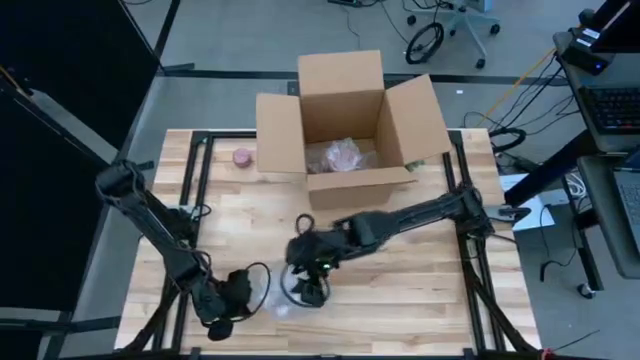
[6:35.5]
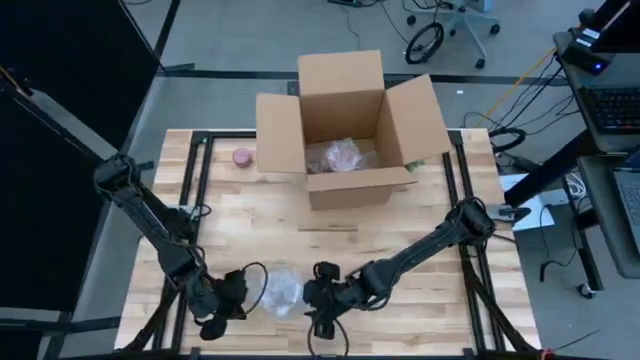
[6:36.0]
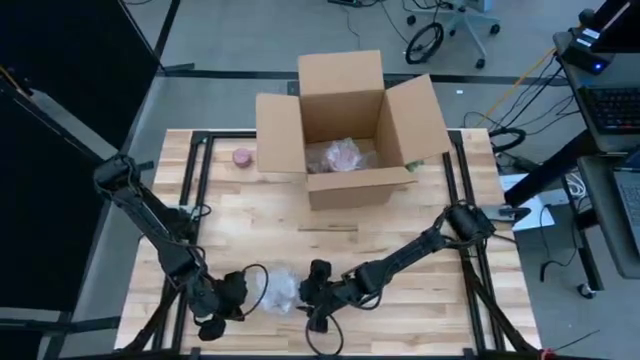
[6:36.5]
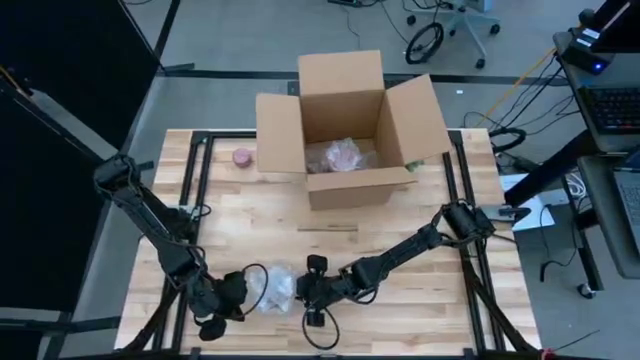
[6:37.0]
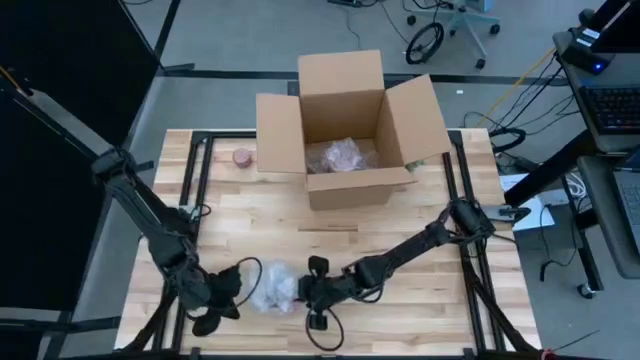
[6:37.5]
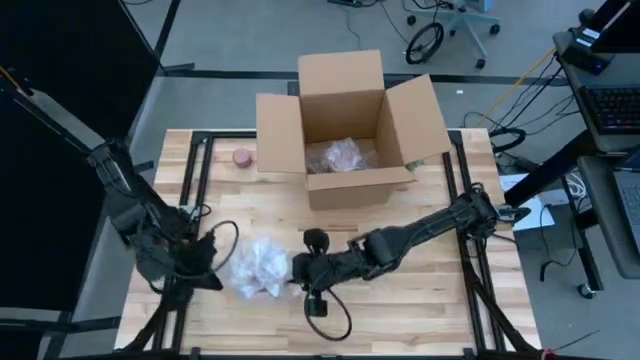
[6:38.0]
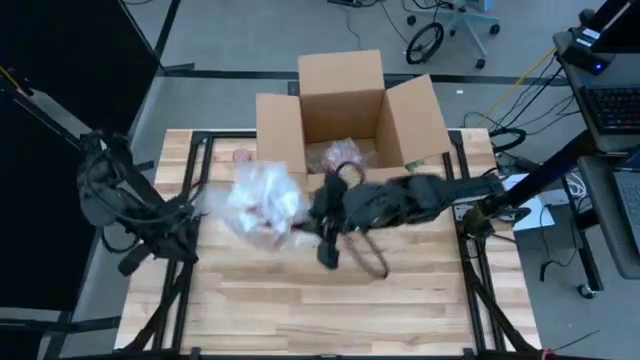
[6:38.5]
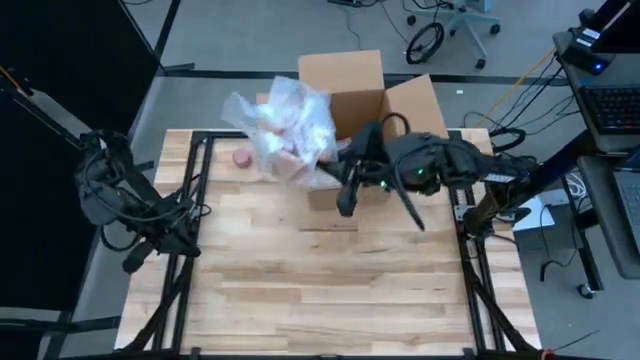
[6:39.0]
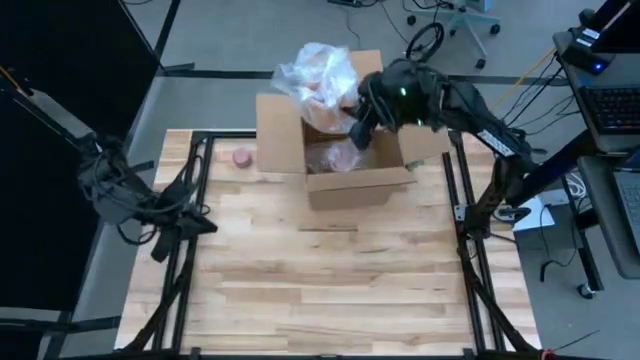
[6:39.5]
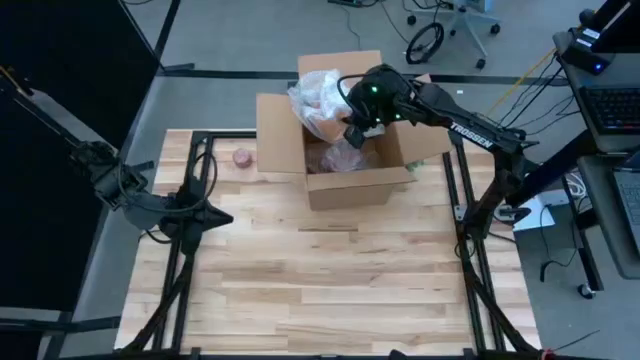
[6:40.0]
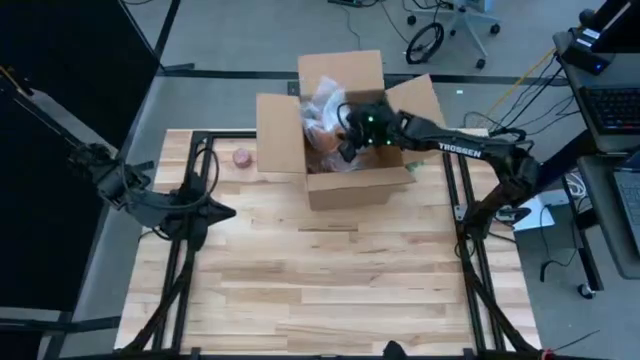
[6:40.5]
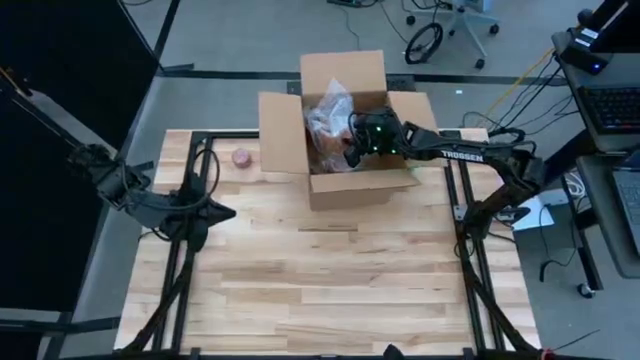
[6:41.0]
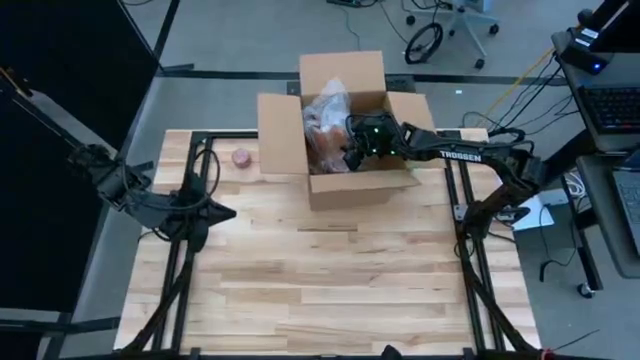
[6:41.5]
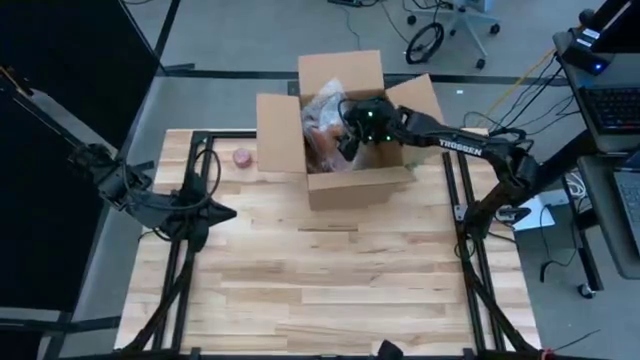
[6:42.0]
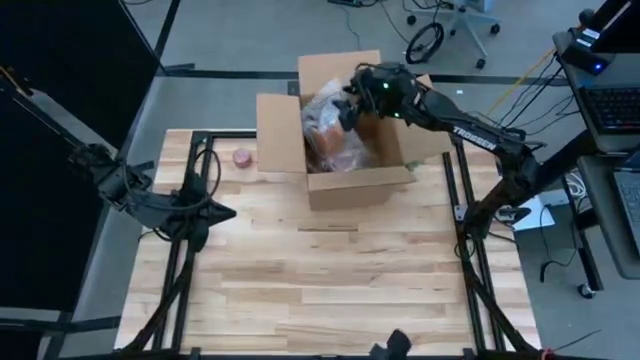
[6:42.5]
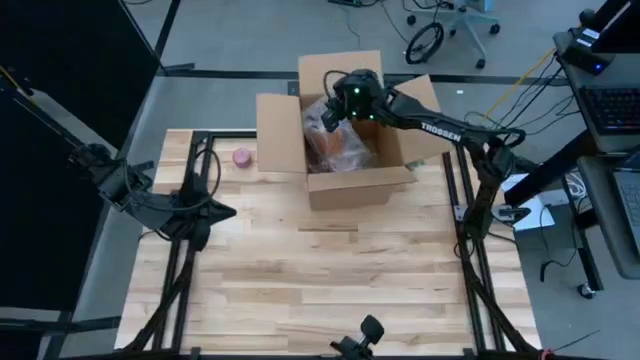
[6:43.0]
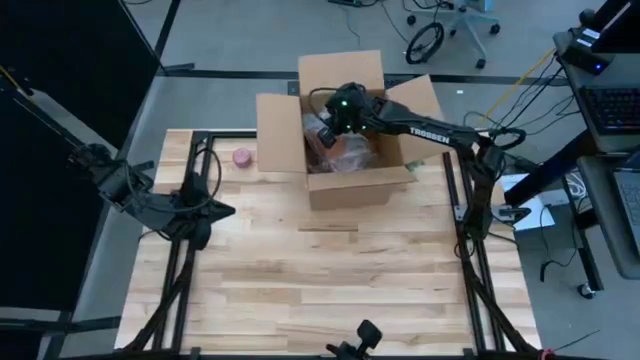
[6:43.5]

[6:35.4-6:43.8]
Task: wrap mug
Put the orange cup into the box

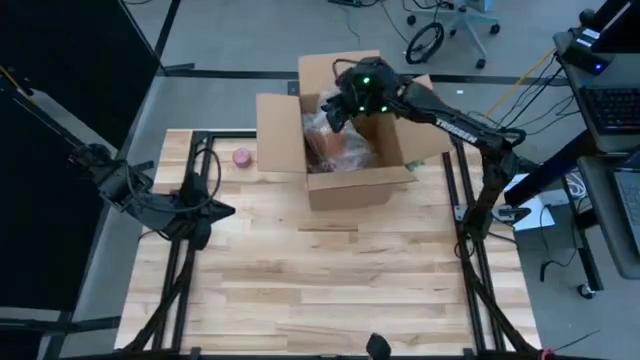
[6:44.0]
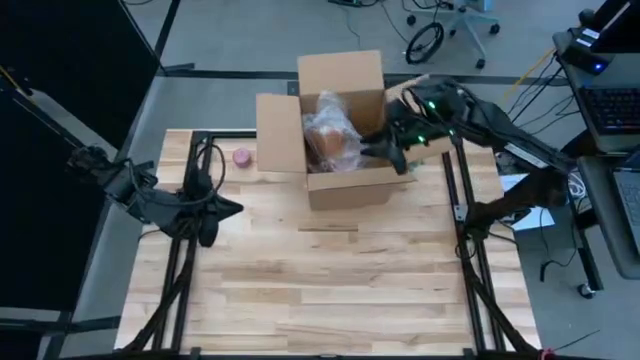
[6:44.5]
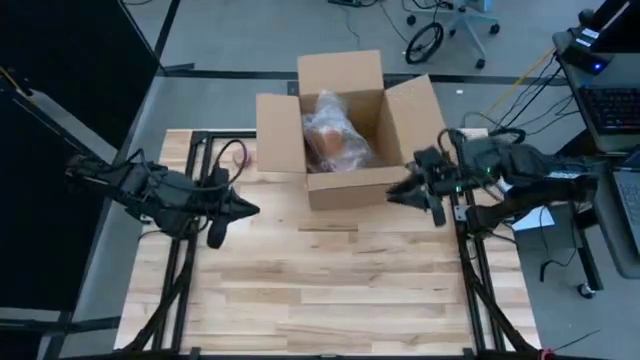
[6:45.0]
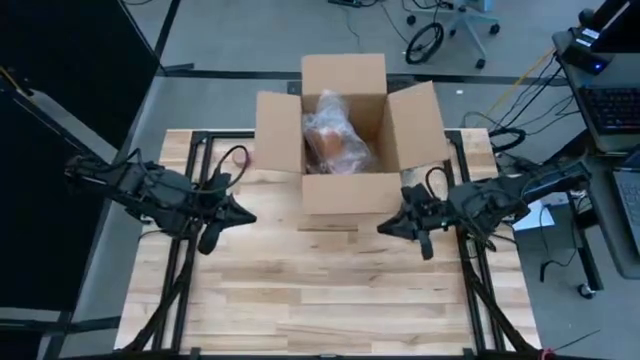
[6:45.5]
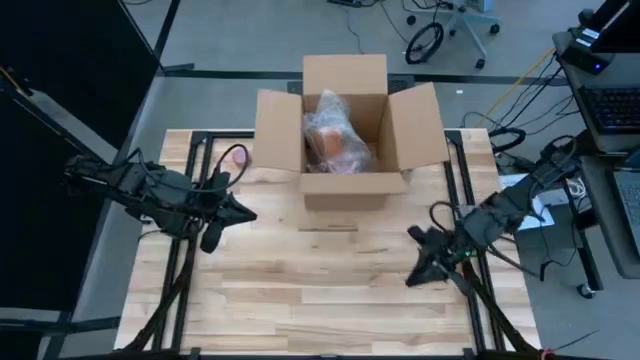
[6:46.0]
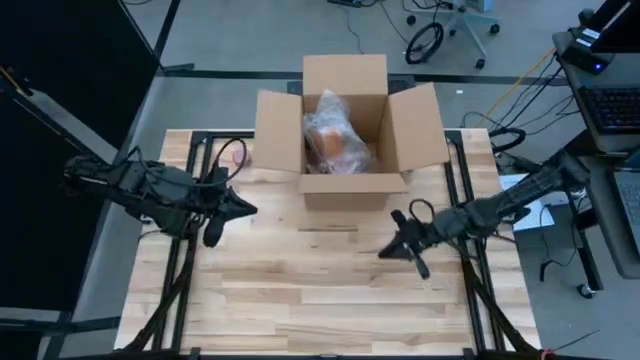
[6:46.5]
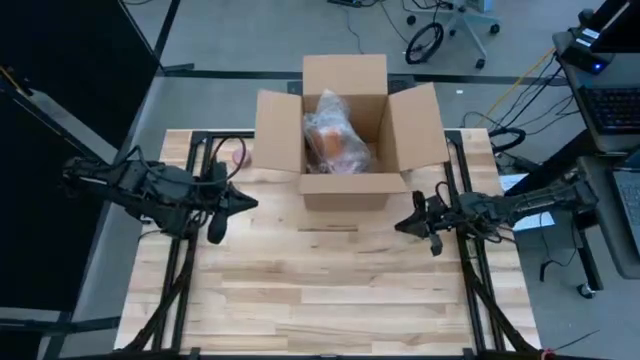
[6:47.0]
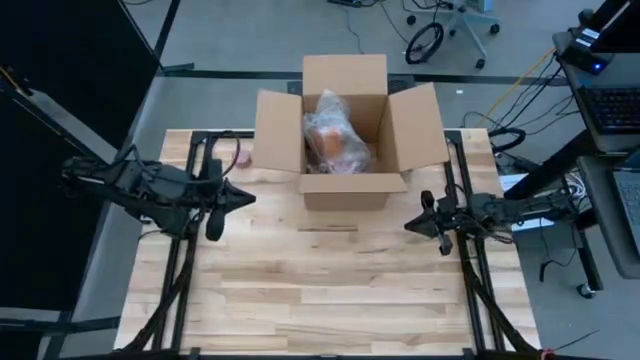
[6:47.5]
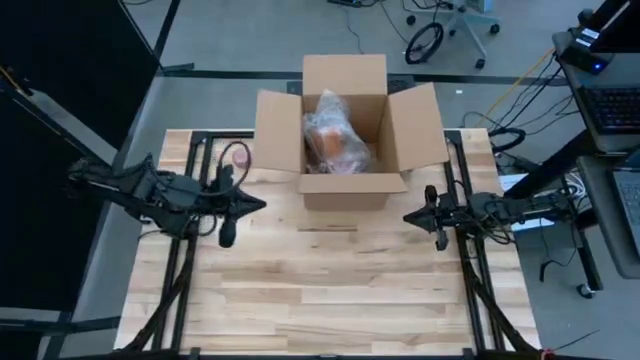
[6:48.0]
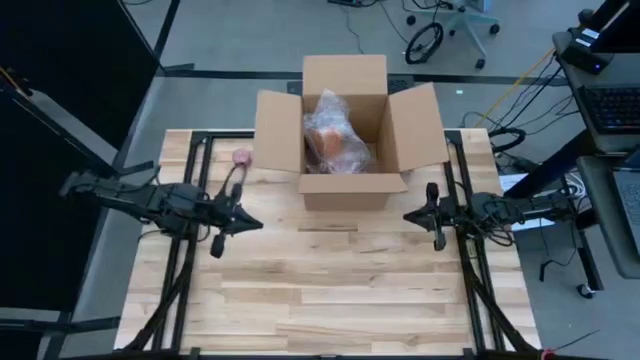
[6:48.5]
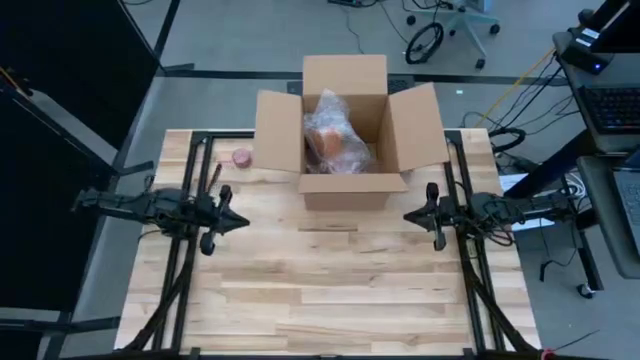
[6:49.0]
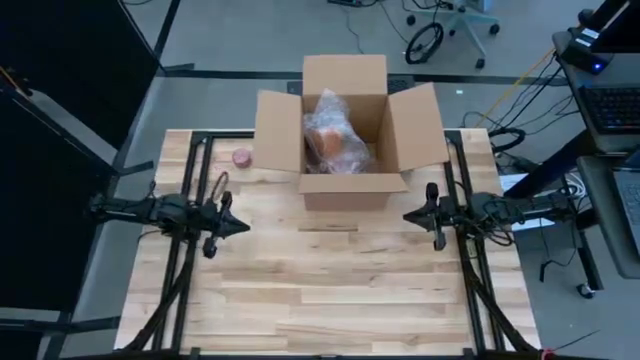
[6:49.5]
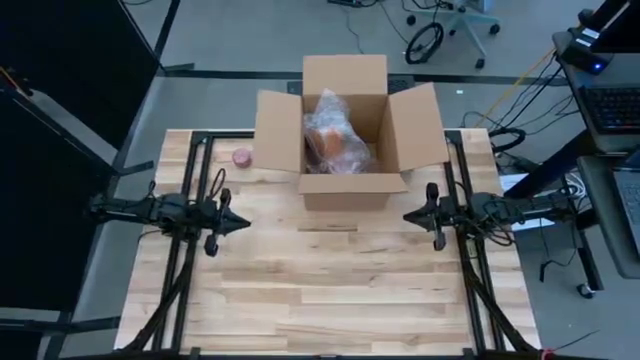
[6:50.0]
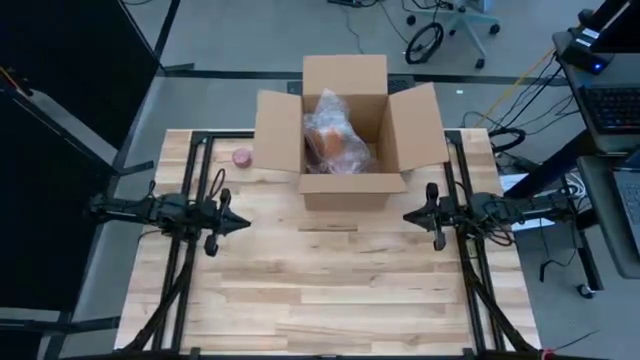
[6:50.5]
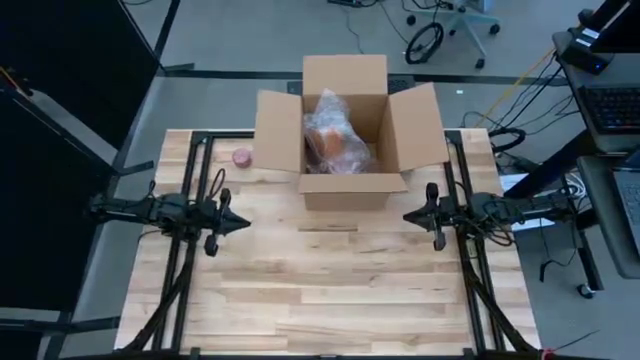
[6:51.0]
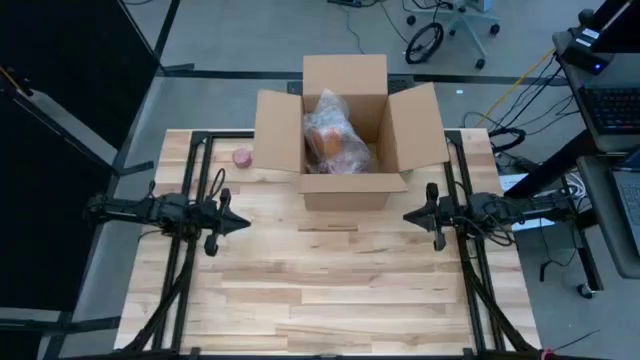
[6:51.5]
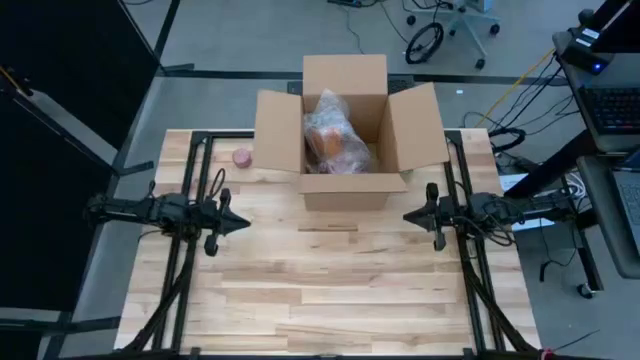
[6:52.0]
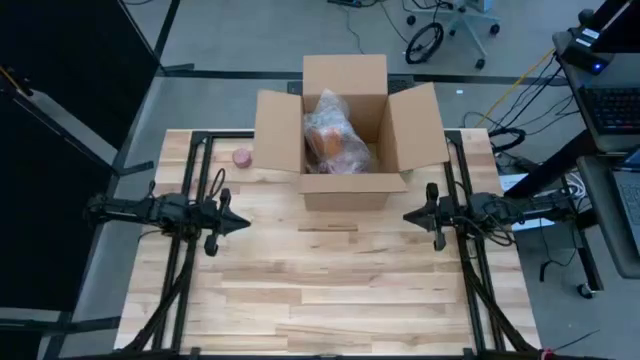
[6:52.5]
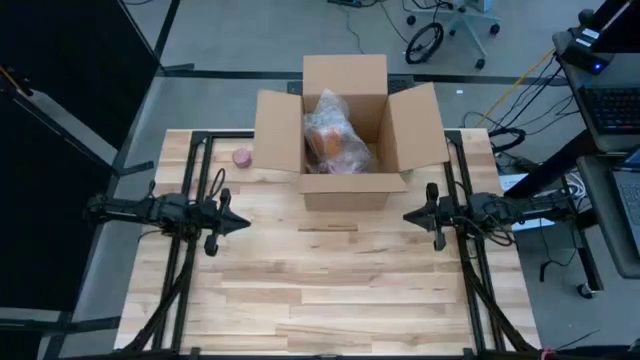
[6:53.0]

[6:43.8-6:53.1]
Return to Home Position

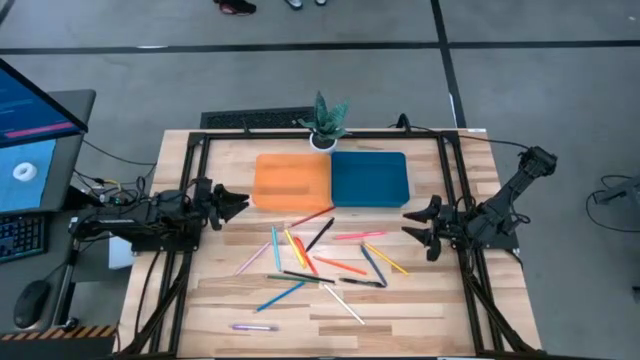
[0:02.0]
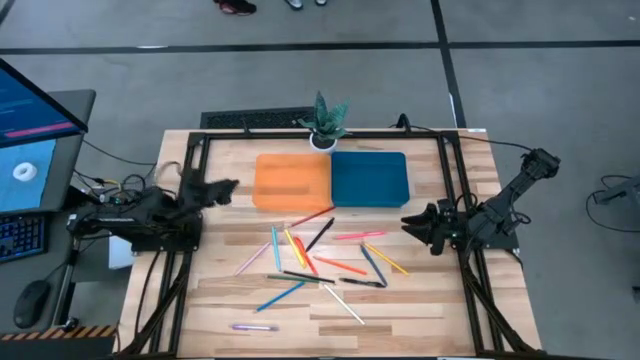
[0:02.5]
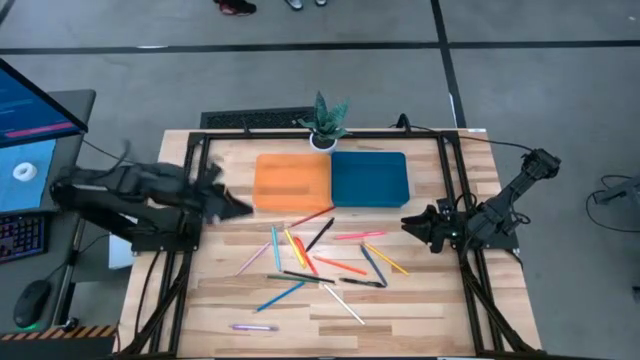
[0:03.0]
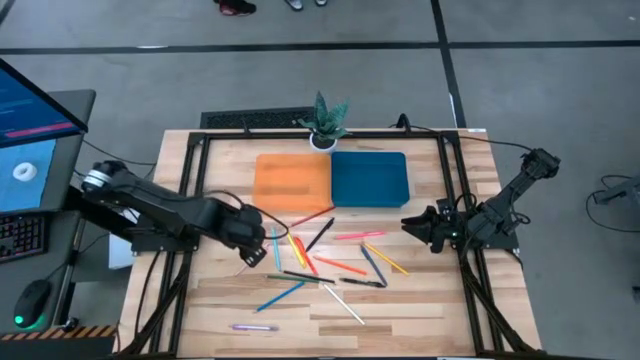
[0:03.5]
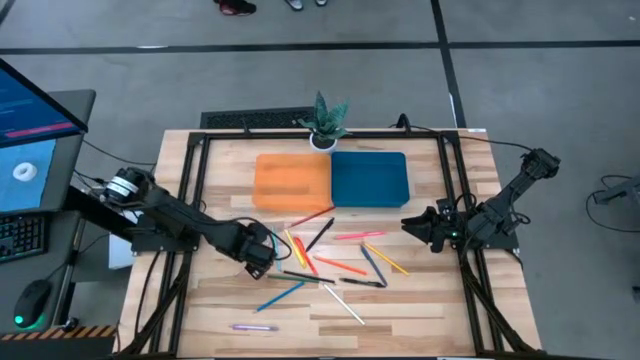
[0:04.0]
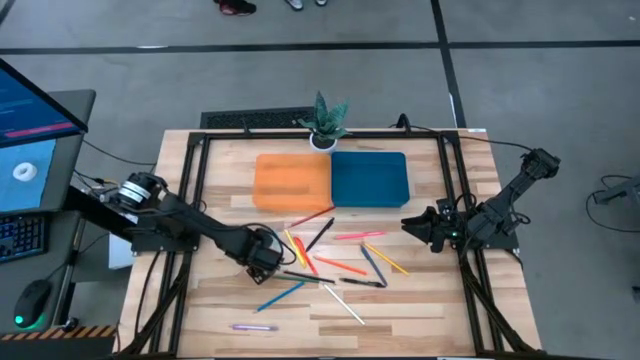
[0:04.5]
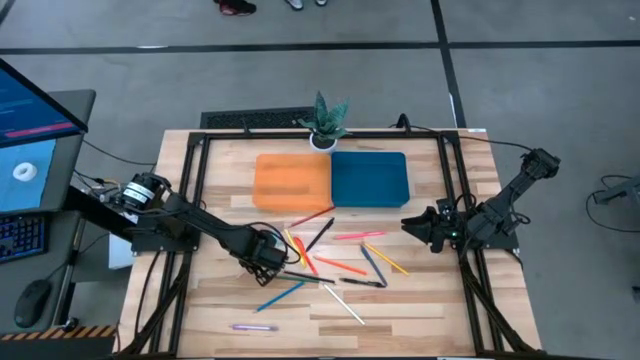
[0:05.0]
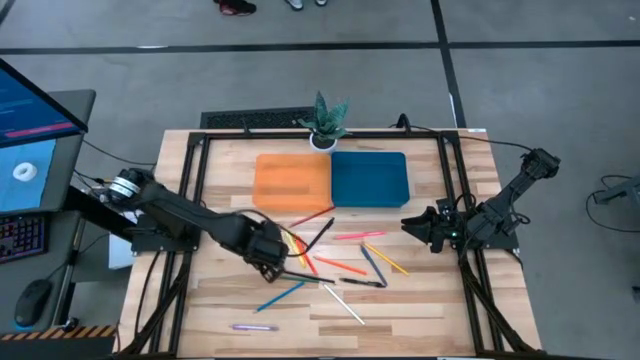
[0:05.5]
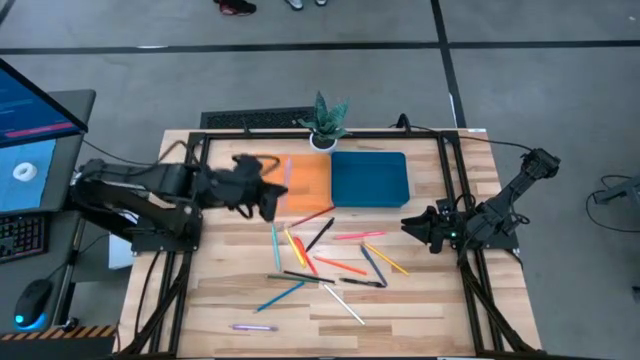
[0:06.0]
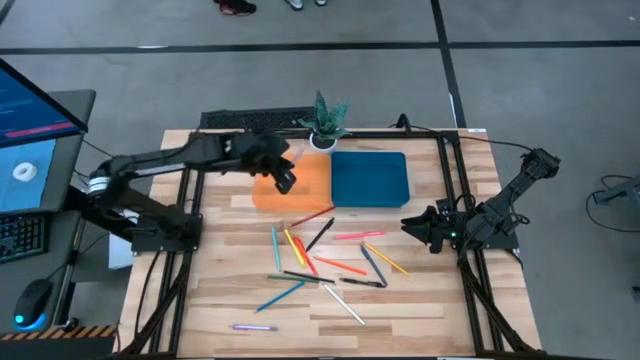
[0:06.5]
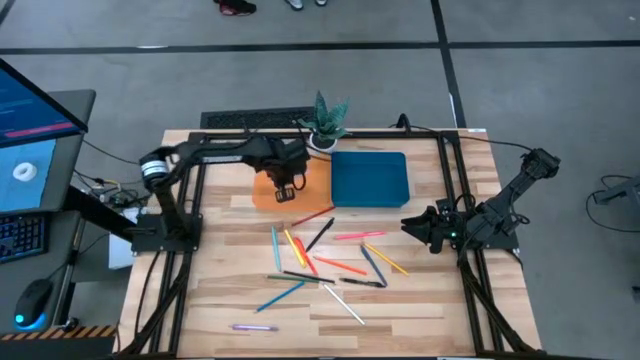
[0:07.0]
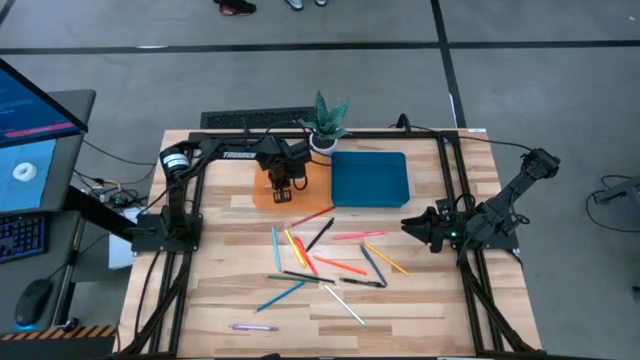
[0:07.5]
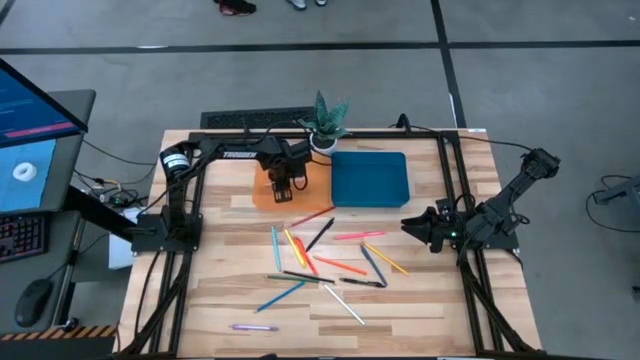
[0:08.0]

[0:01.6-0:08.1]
Task: Sort pens & pencils
Put the light pink pen into the orange bin
